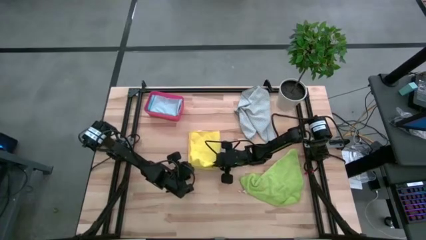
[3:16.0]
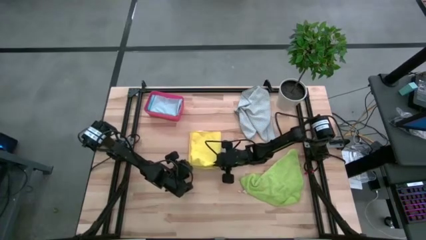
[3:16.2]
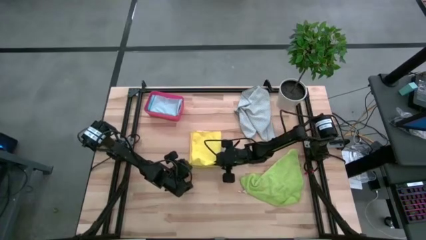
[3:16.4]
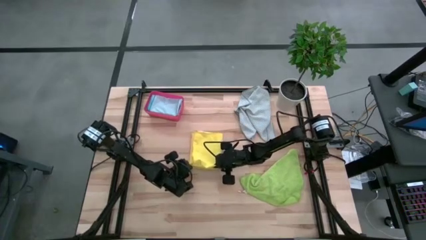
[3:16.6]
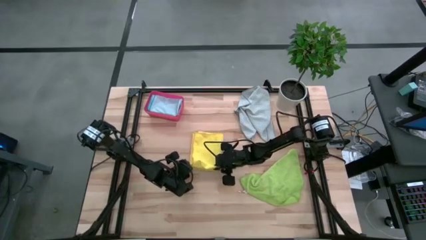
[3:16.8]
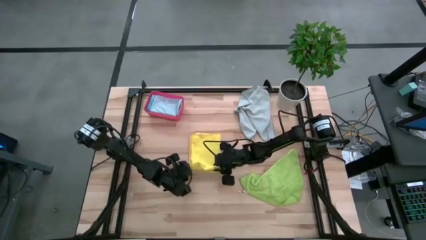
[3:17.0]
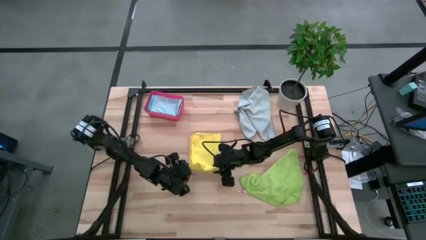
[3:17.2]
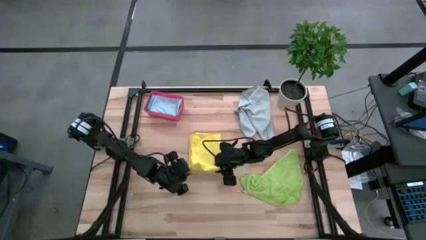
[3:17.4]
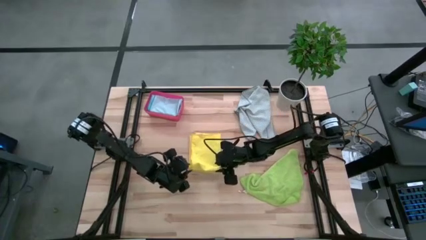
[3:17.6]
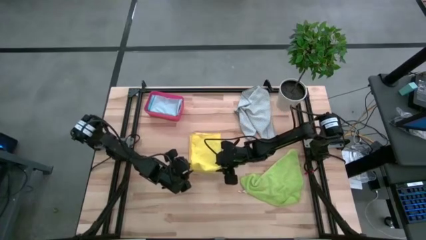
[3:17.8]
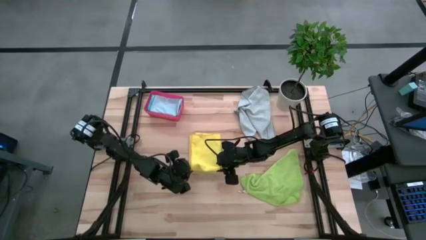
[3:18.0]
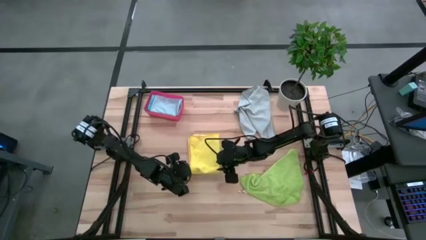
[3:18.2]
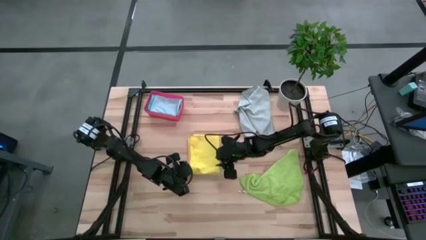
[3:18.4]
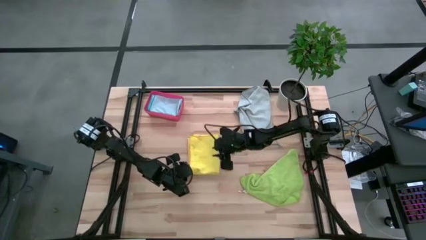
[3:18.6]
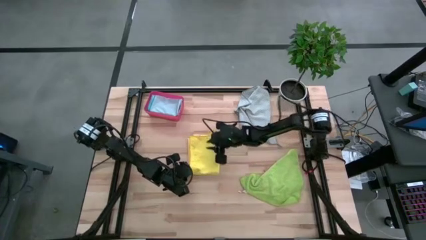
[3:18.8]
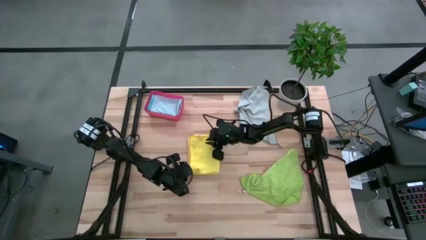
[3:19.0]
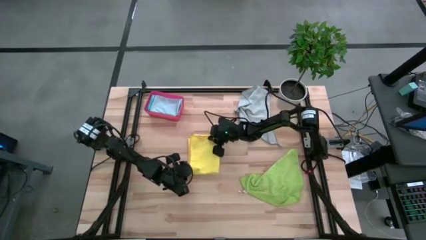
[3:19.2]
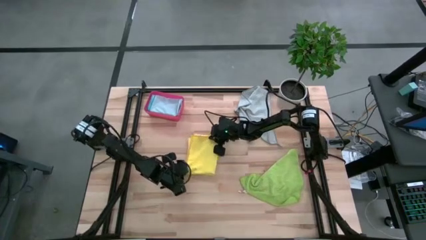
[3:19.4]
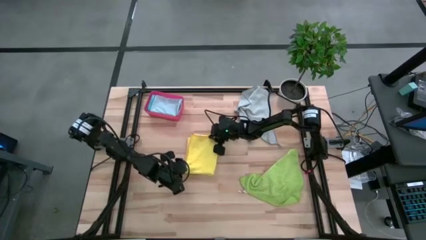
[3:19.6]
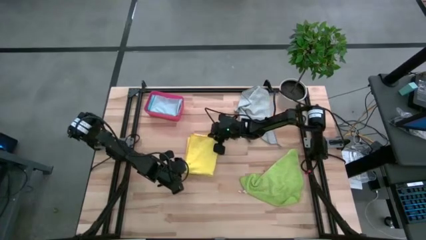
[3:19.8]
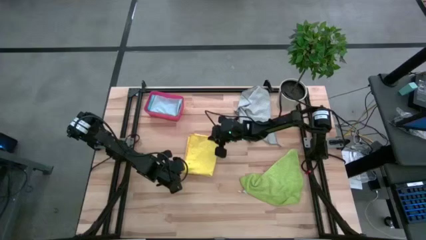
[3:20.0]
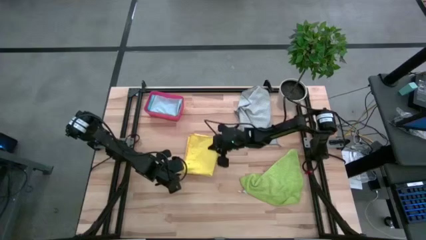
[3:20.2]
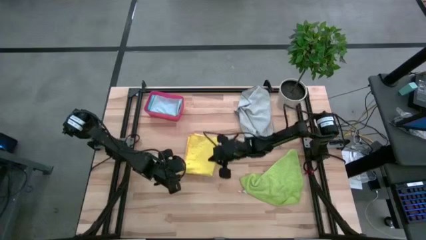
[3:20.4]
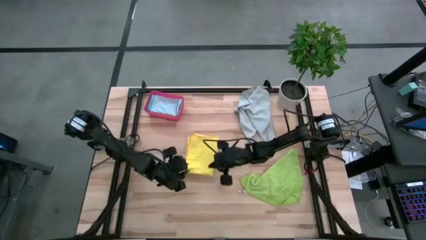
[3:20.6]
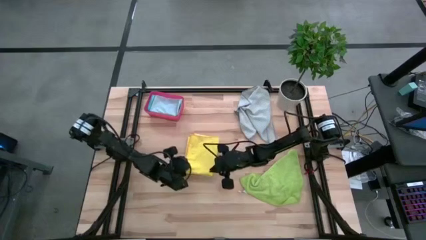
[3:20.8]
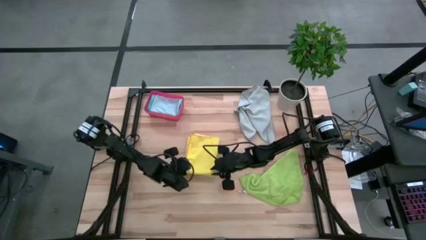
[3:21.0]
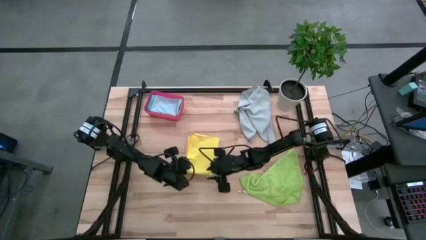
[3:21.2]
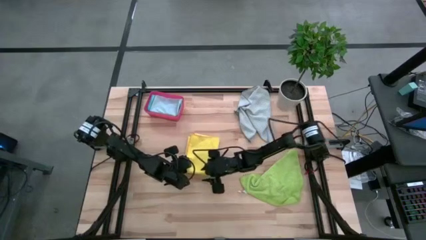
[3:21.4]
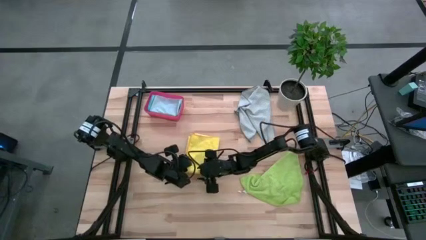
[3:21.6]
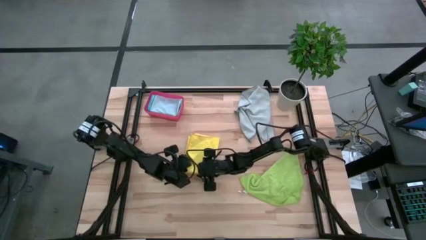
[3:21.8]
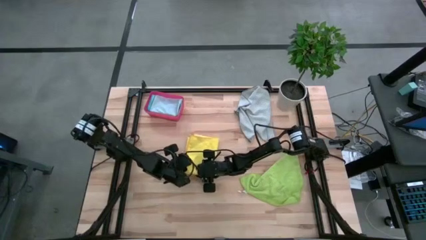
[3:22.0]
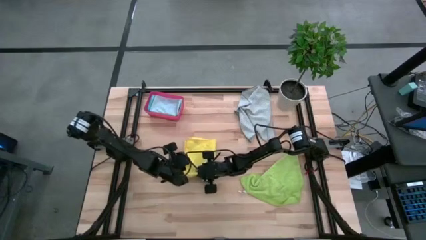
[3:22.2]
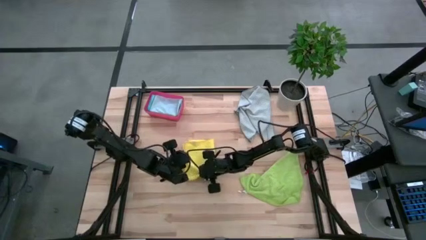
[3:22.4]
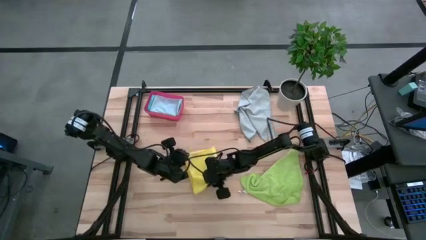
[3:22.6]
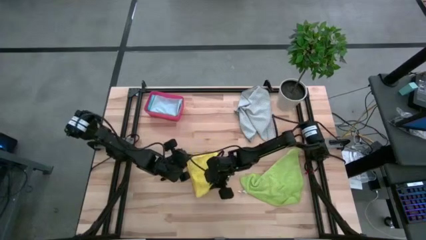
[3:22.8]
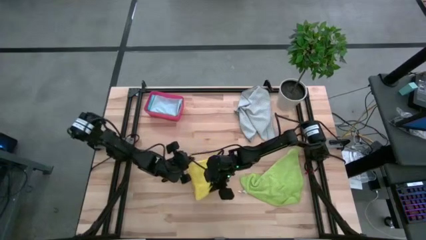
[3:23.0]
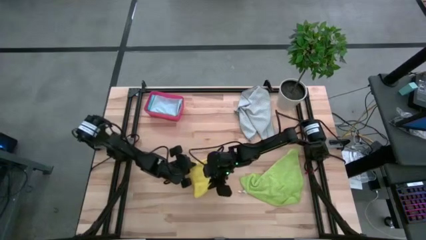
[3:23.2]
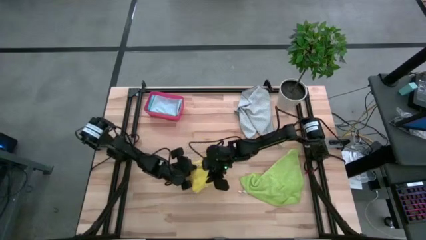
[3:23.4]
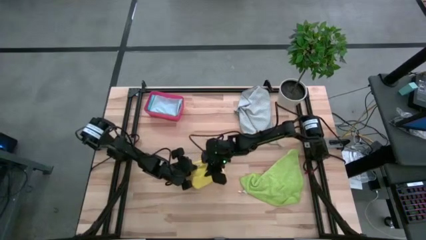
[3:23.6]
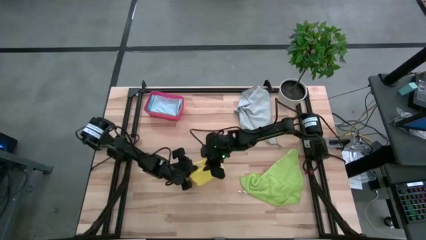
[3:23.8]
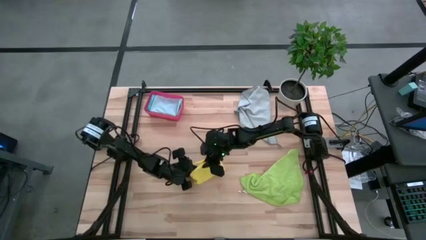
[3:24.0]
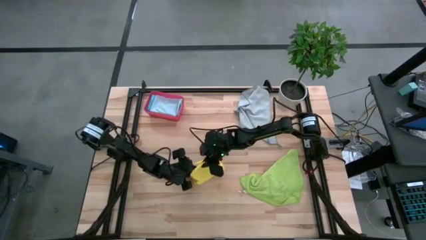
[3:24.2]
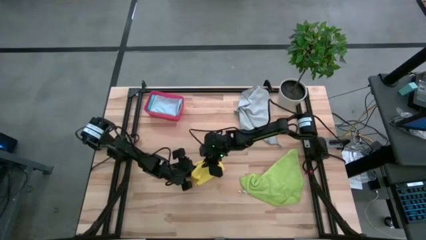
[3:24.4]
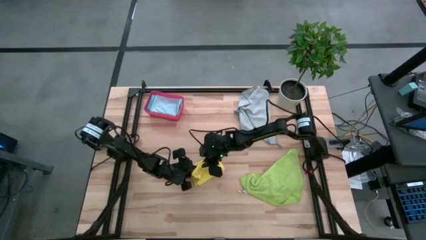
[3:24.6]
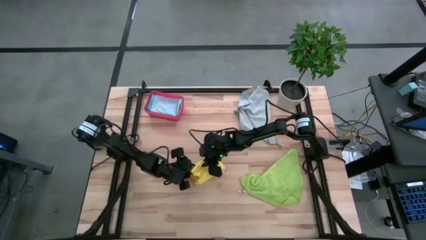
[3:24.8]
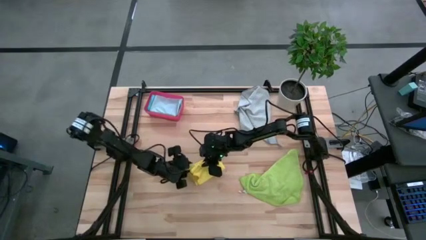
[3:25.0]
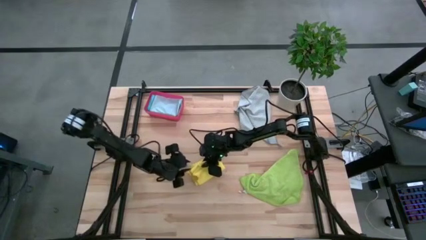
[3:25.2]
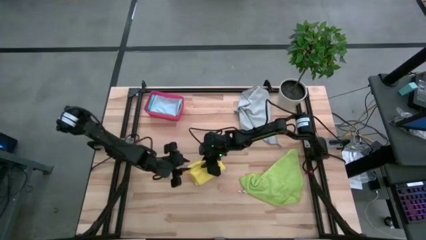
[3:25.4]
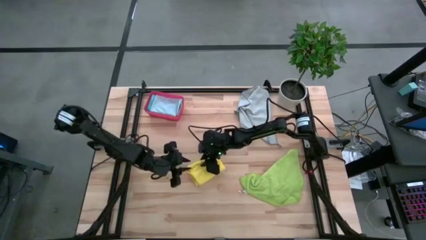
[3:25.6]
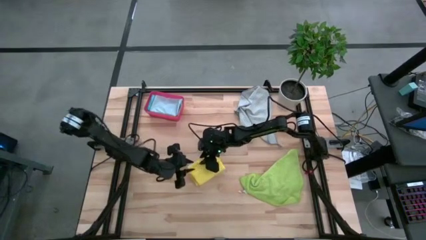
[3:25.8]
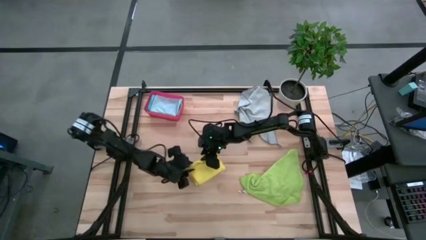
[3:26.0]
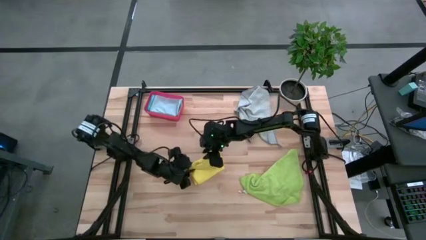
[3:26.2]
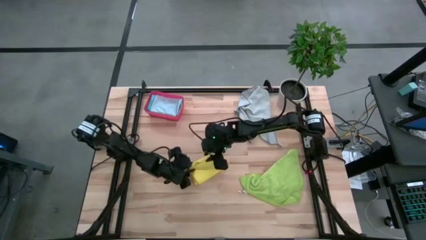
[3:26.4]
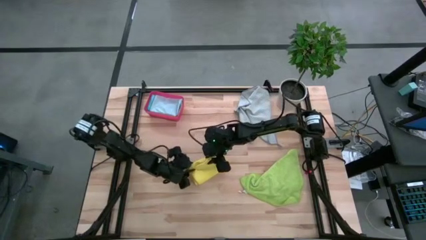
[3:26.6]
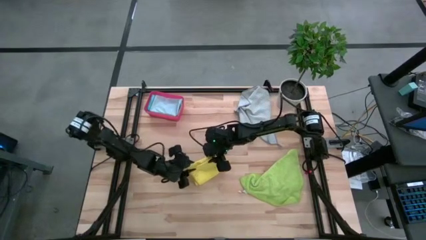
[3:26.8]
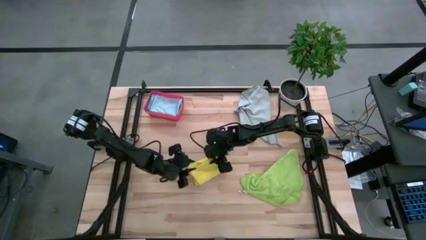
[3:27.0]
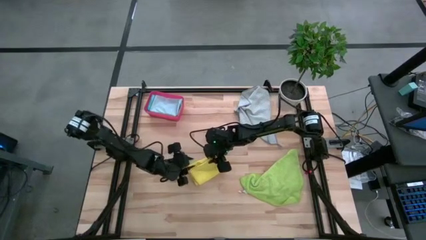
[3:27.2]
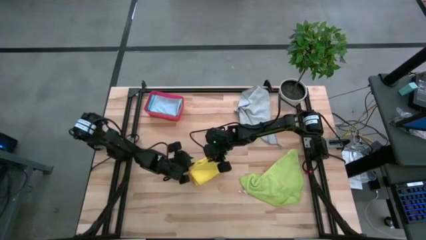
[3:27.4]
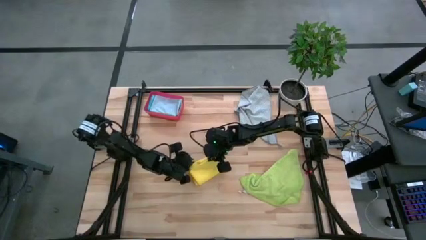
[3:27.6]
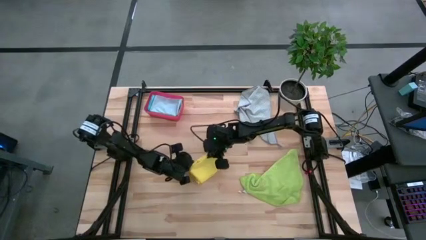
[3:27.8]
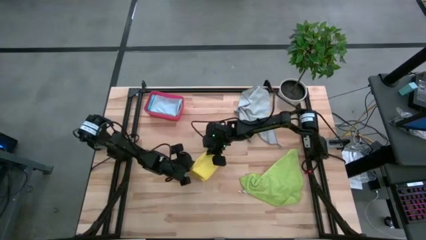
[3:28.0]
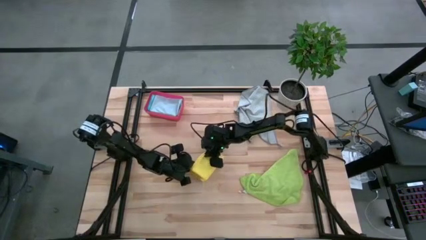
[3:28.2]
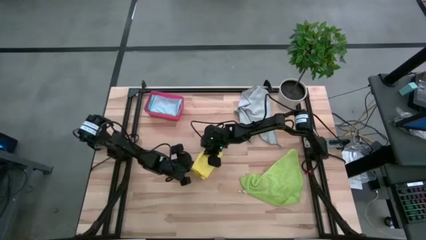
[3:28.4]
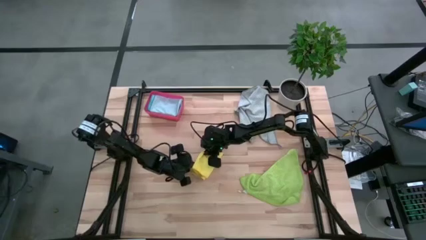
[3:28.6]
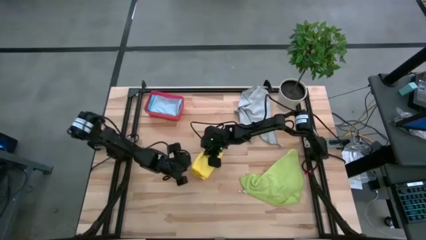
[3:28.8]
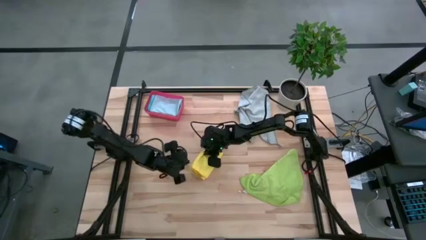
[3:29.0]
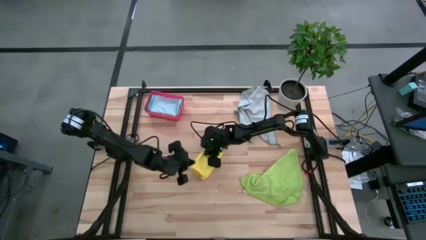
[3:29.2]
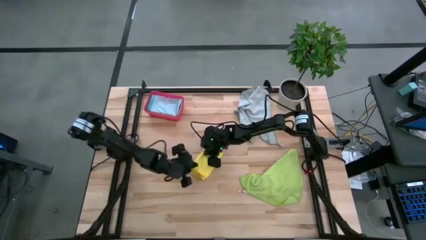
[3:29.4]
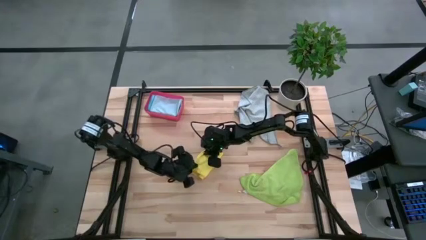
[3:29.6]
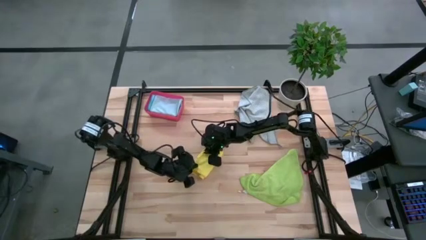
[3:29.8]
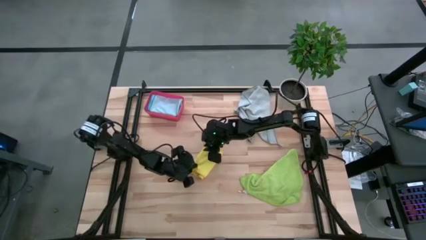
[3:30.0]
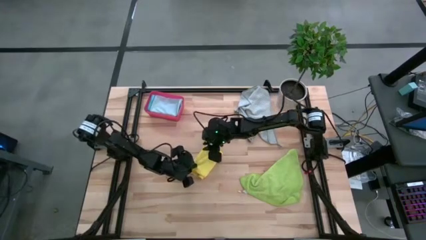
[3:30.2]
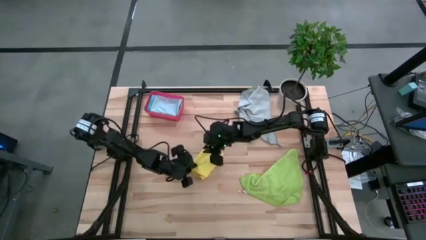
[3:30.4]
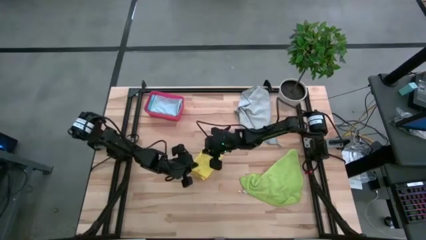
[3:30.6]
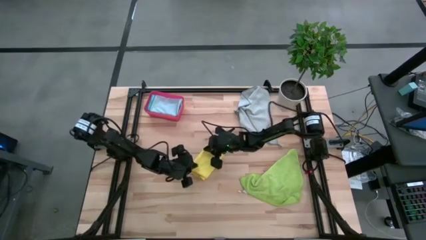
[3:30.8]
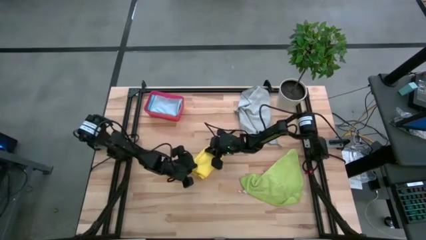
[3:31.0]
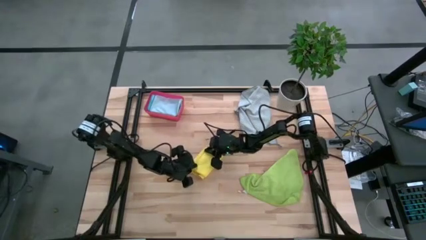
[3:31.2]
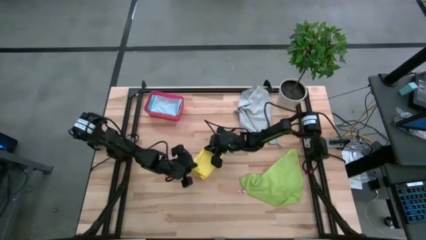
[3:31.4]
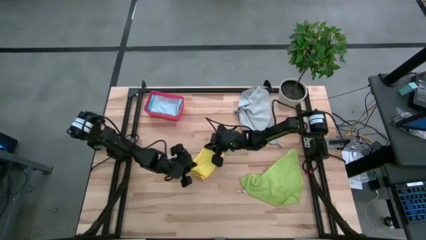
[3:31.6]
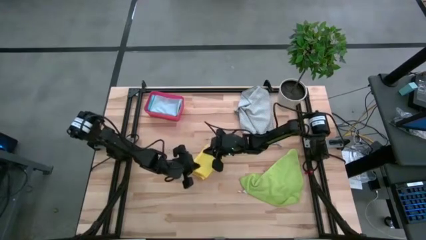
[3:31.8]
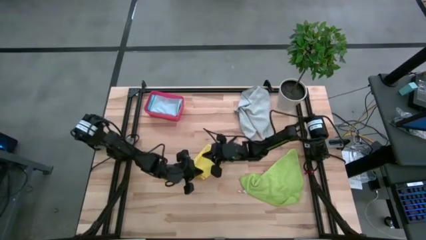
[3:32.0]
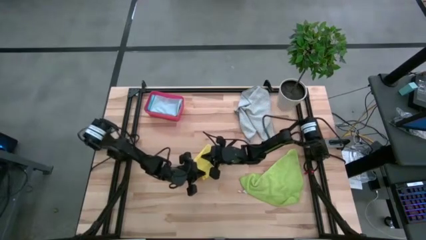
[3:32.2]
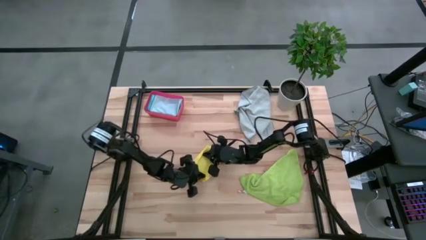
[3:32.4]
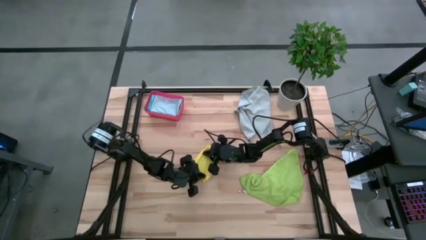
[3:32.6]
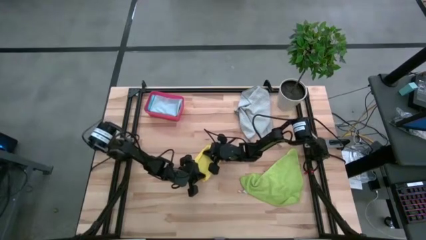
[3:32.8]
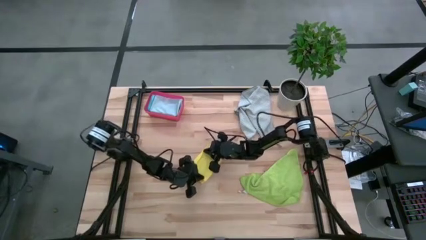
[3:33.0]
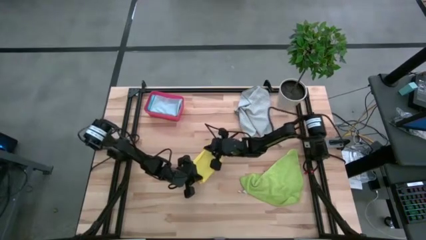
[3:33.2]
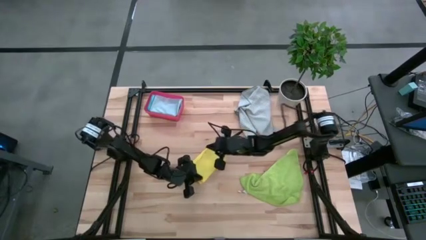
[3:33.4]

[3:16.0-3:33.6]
Task: Fold microfiber towels
Fold the yellow microfiber cloth
